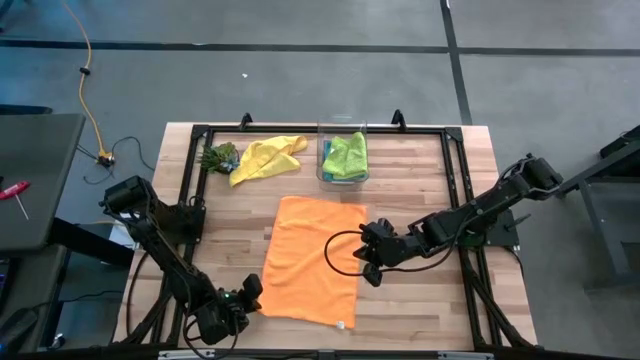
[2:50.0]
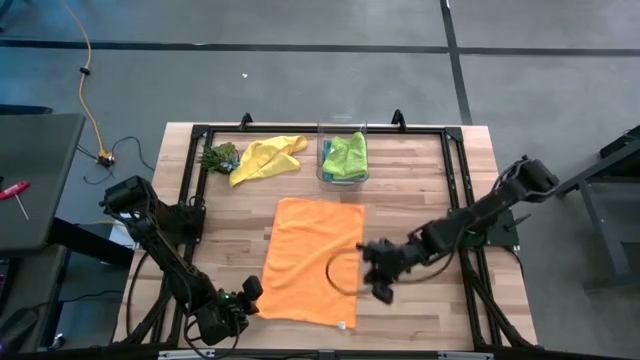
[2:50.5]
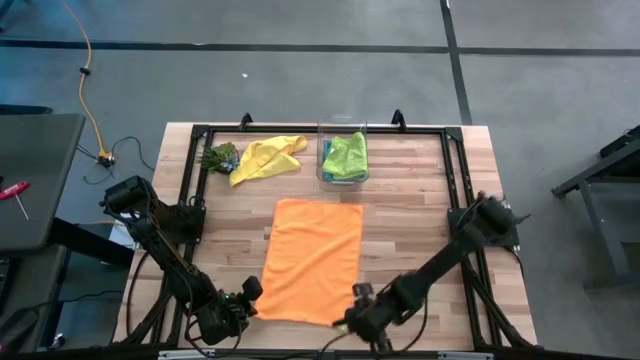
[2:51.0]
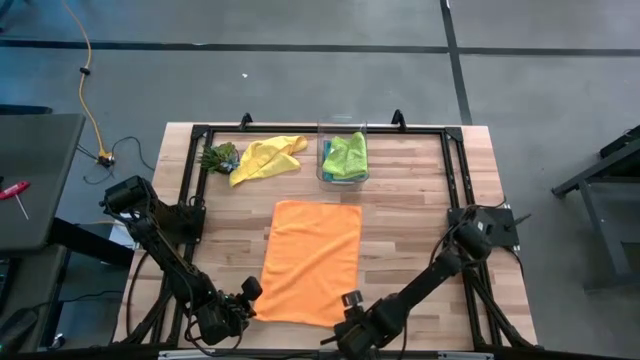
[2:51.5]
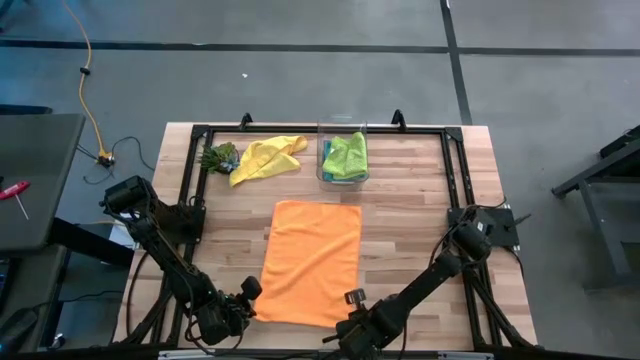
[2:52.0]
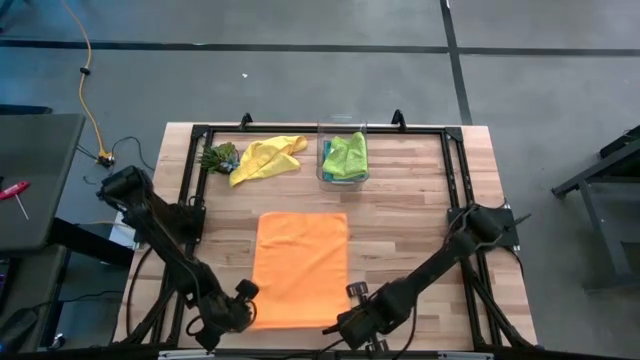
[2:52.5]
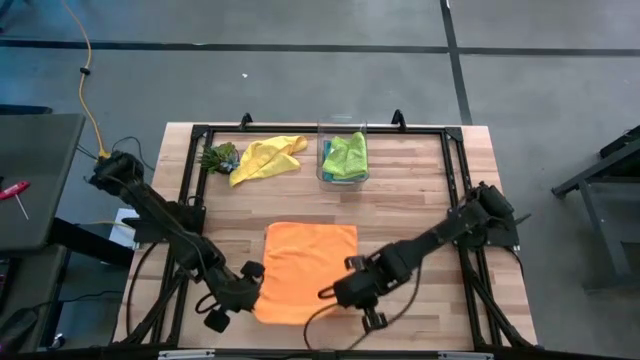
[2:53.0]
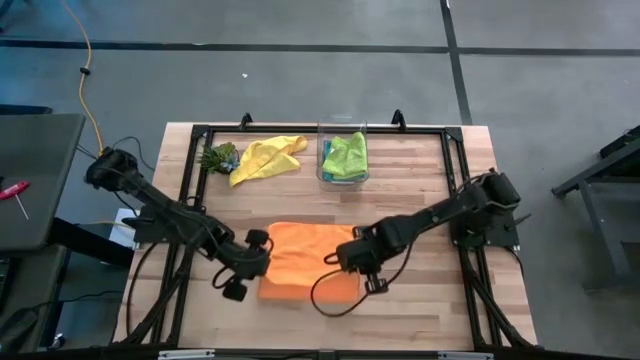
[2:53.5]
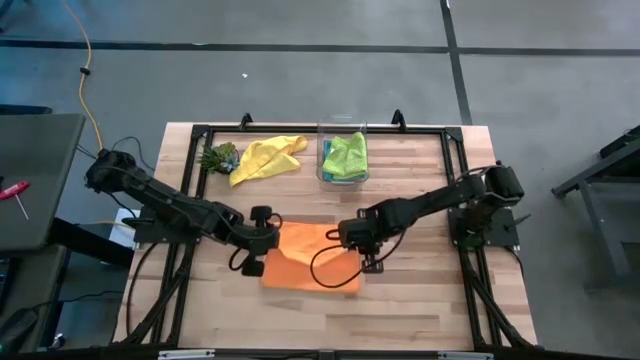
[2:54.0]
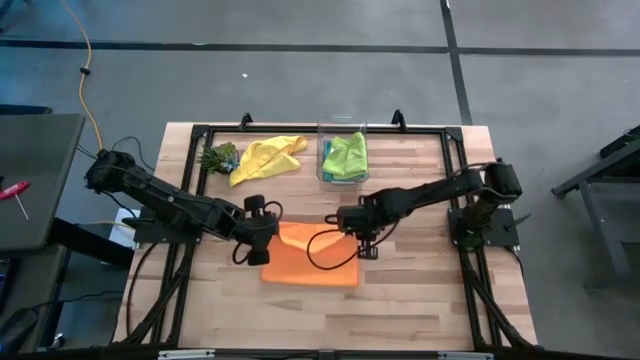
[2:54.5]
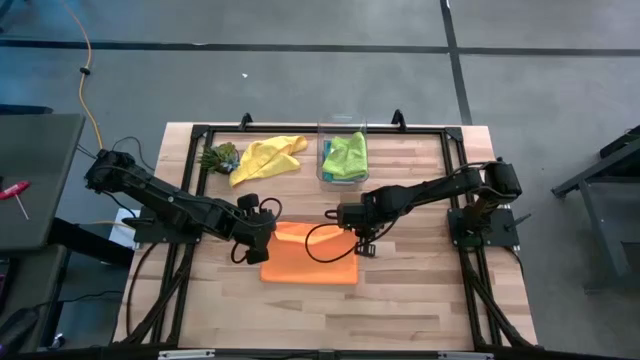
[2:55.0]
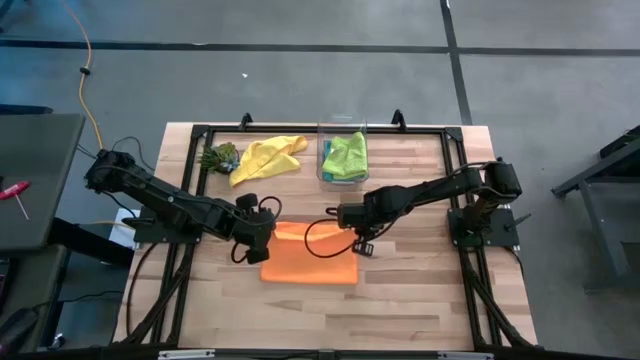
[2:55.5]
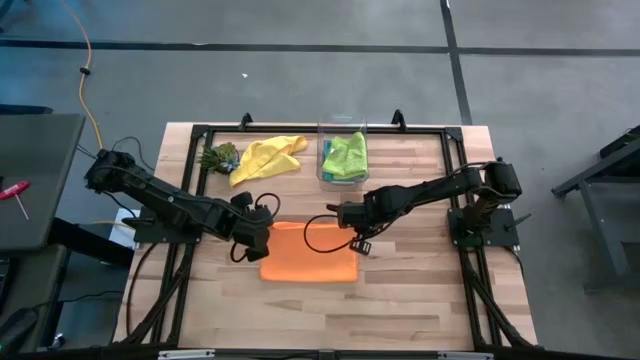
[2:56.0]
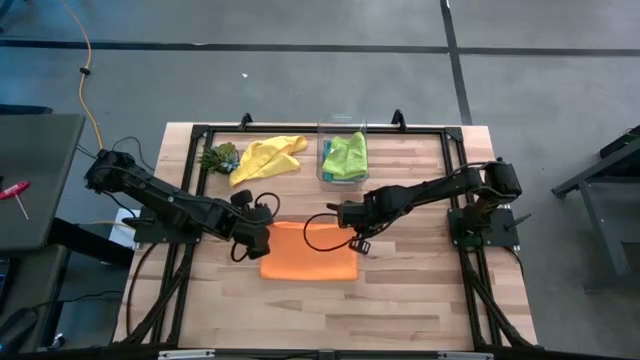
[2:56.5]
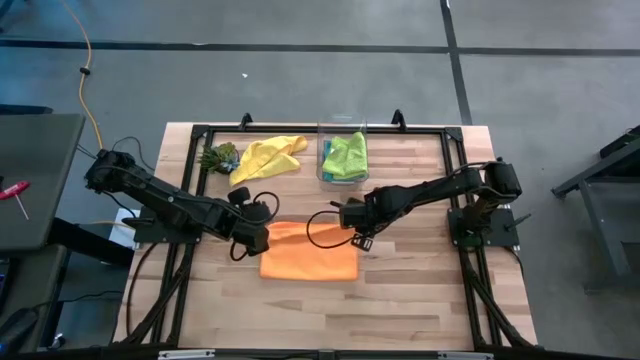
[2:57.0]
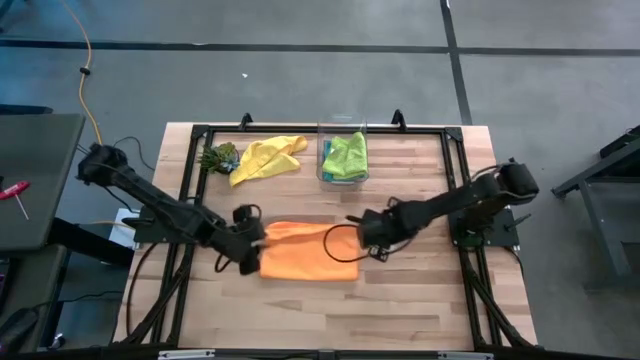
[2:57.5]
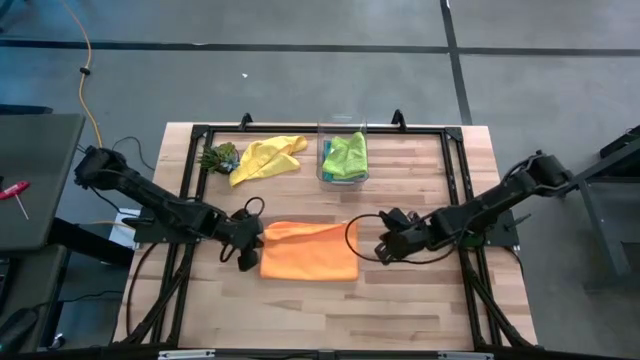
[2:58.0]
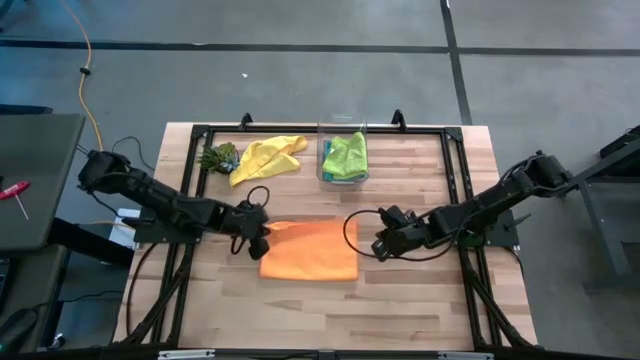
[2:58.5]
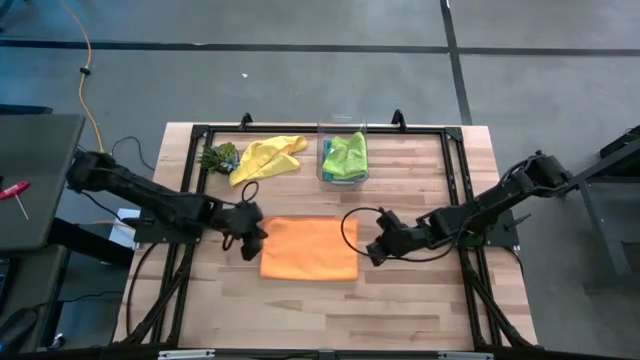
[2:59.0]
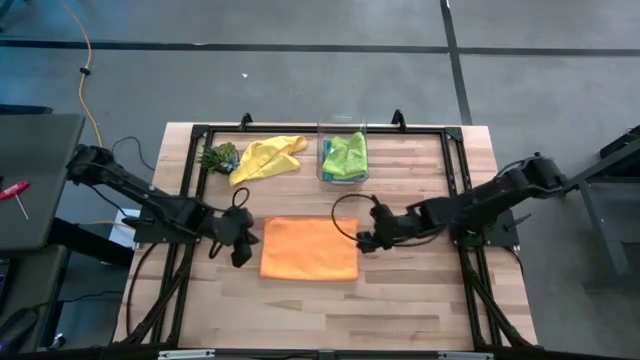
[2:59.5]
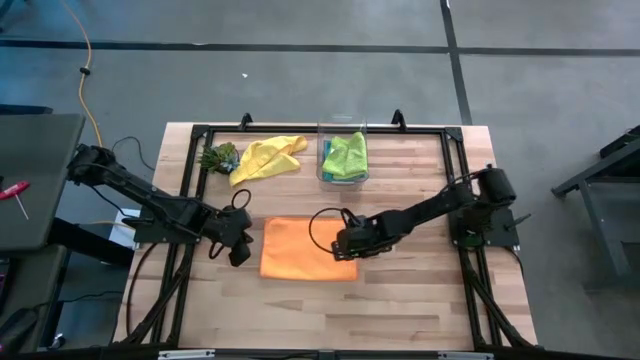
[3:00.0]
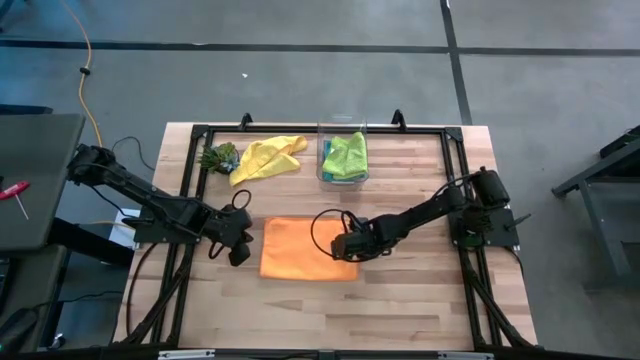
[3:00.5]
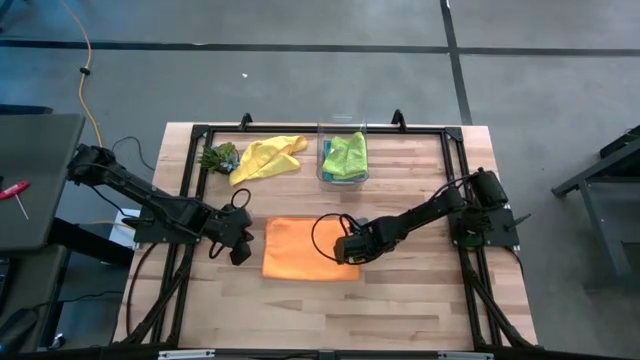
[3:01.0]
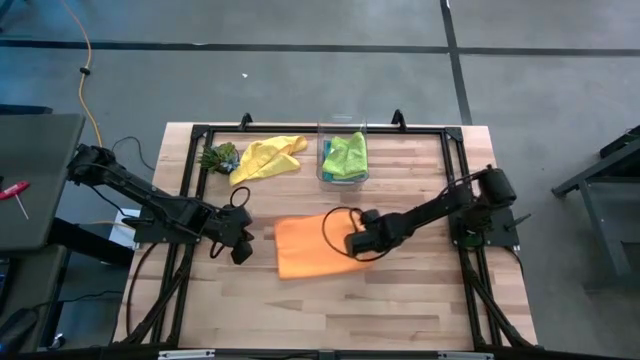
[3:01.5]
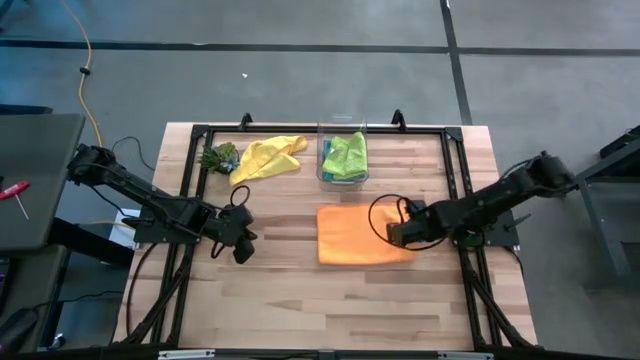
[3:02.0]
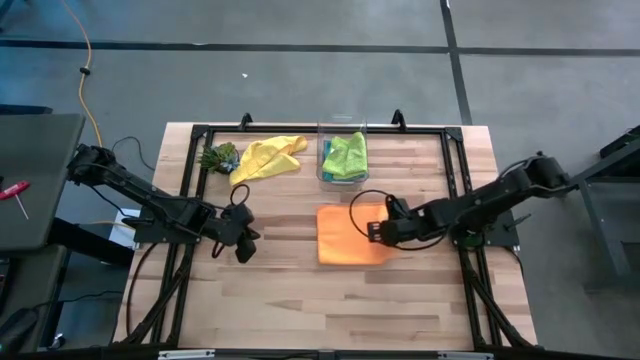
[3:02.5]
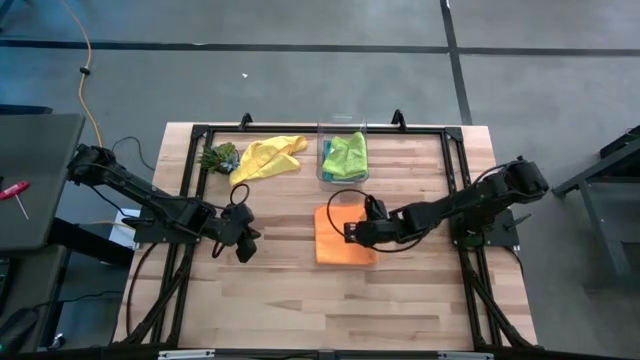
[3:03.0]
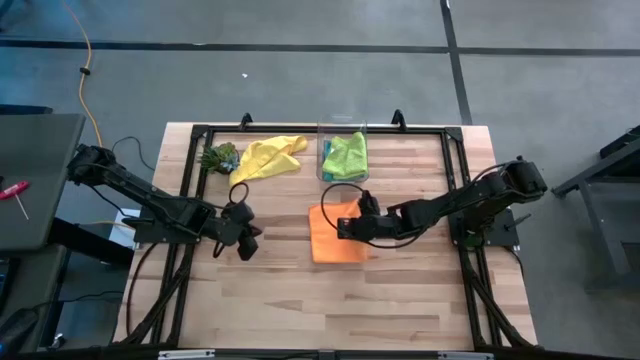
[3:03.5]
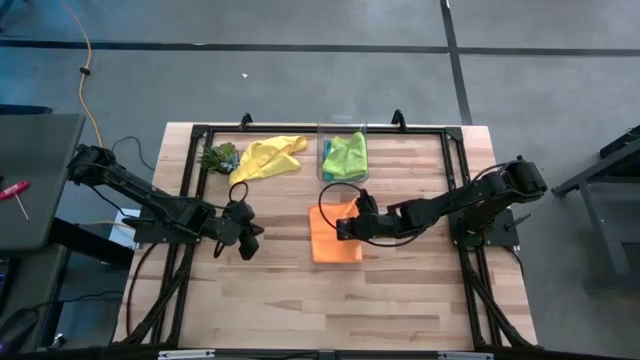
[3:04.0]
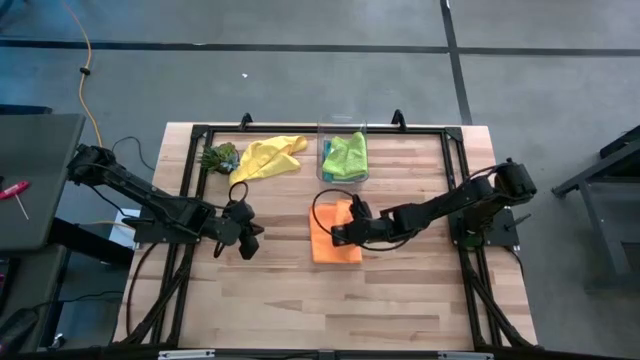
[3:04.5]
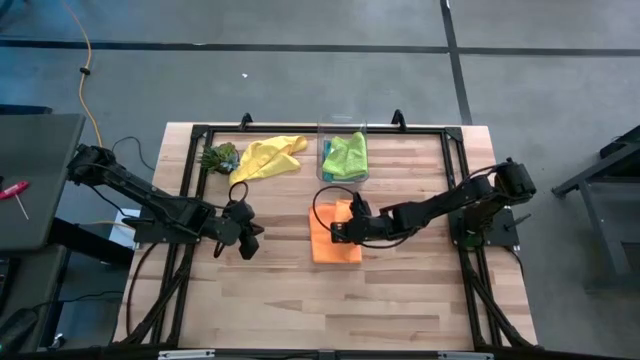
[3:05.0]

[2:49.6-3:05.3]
Task: Fold microfiber towels
Fold the orange microfiber cloth

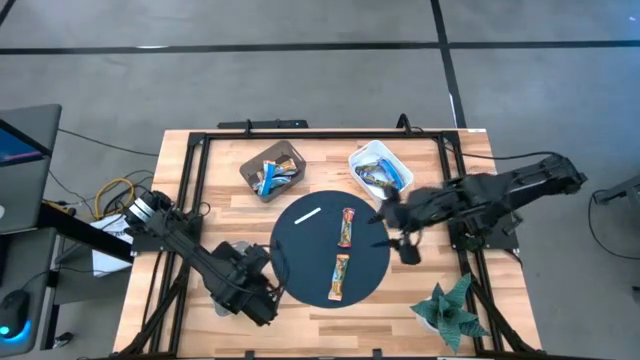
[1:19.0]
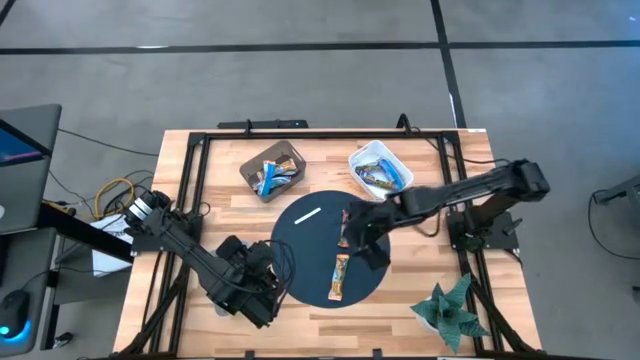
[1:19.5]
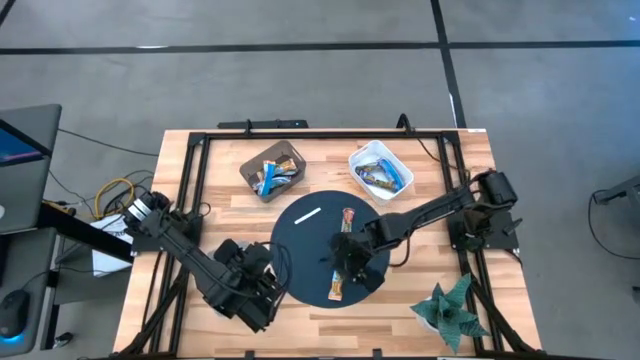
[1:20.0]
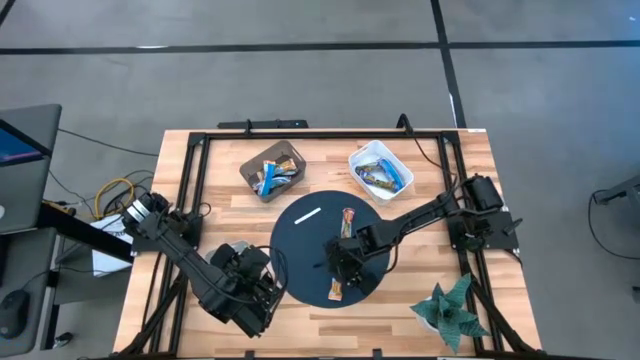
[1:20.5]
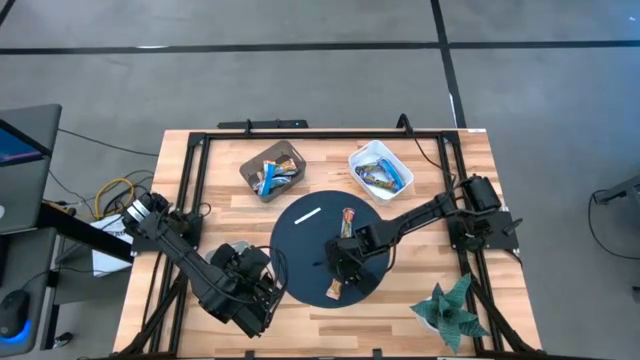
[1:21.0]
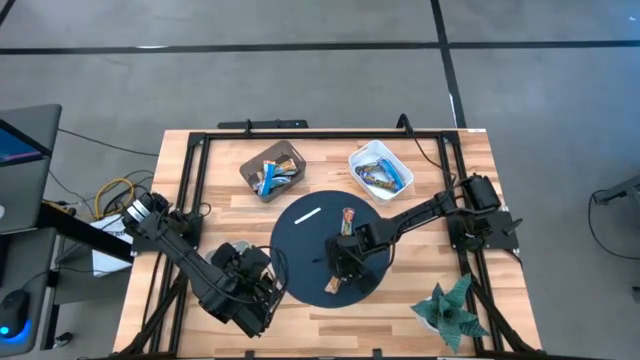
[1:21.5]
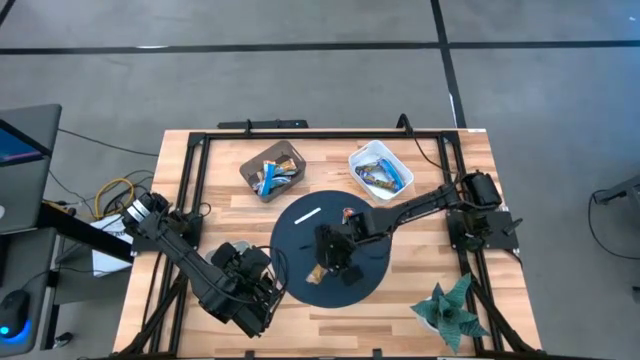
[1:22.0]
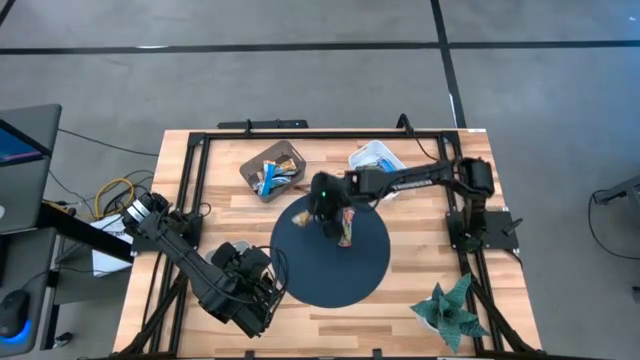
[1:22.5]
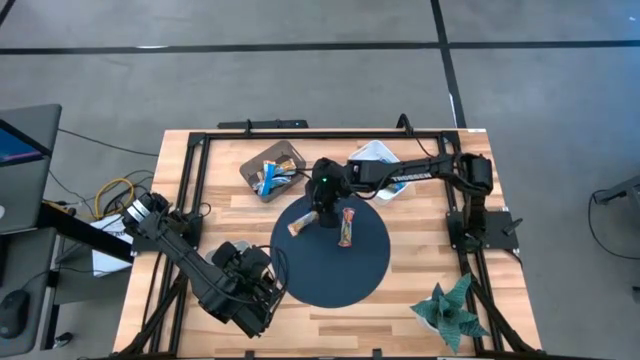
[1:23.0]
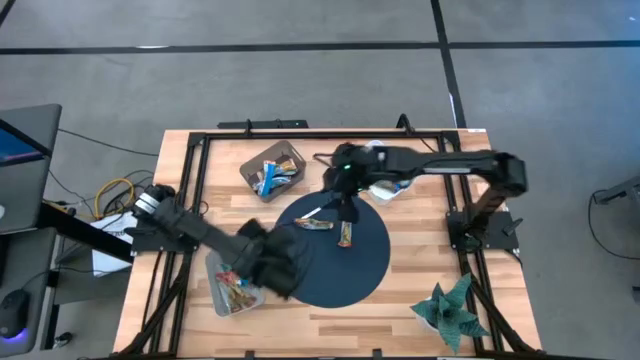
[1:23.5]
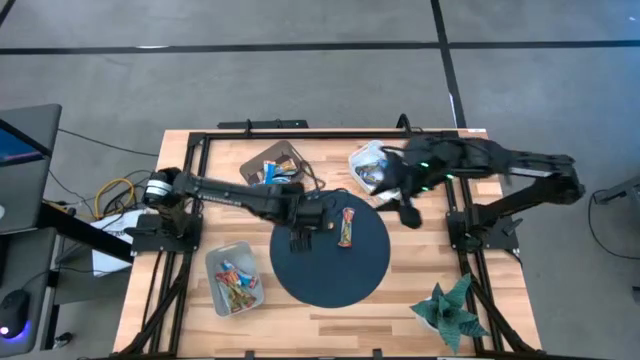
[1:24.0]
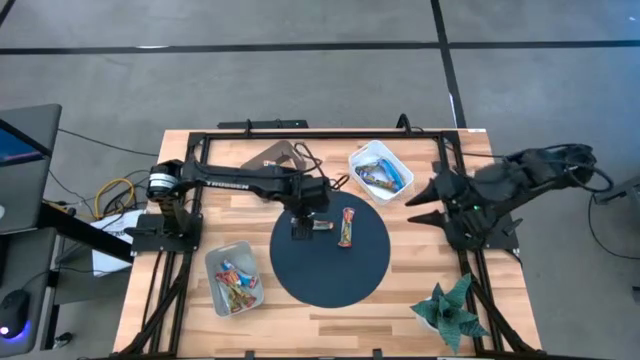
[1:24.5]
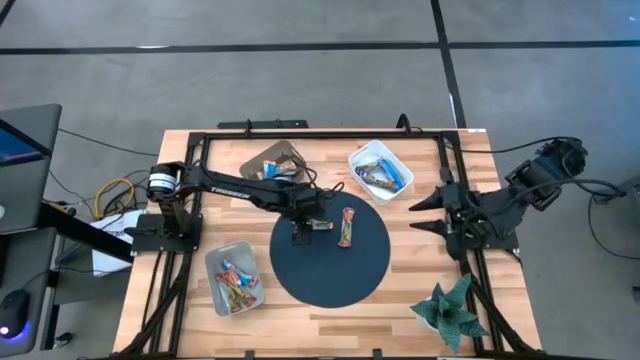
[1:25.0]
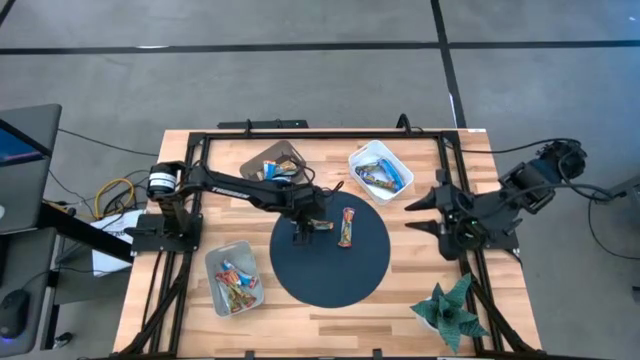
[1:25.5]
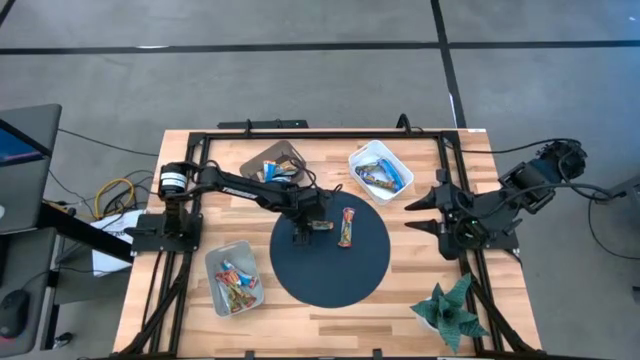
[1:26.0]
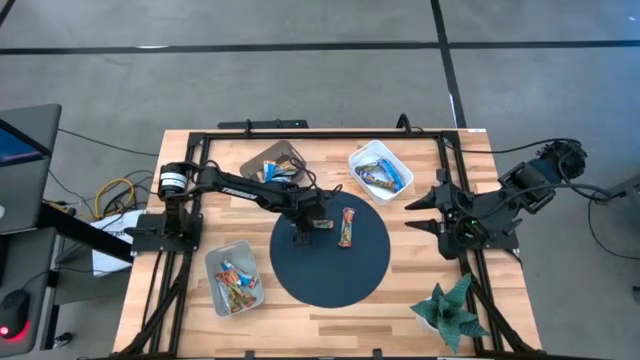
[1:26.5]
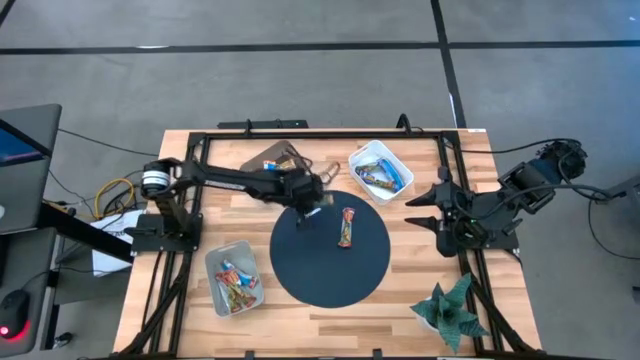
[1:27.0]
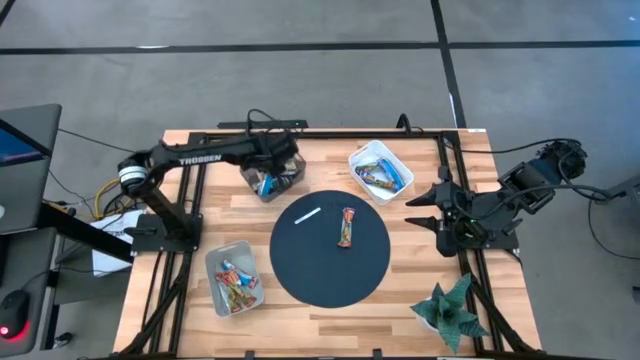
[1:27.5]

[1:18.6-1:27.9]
Task: Pick and place Granola Bars by type
Put the yellow granola bar into the black bin
